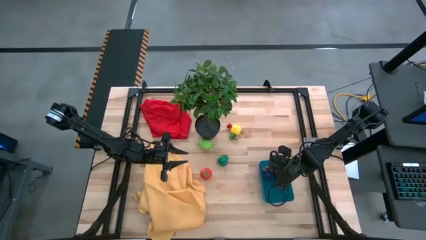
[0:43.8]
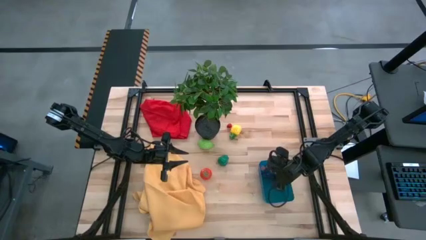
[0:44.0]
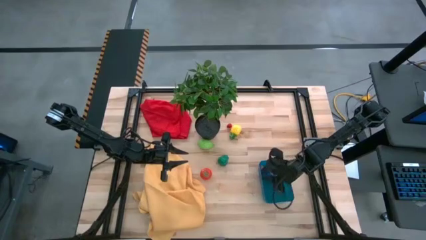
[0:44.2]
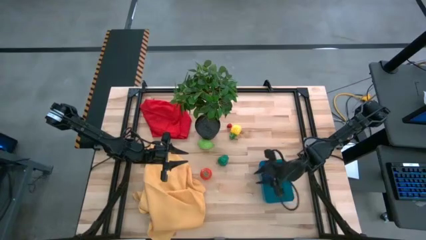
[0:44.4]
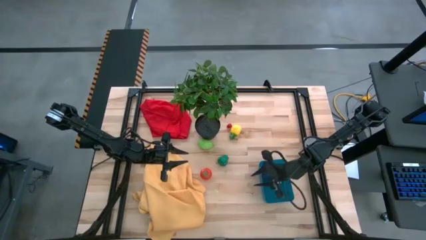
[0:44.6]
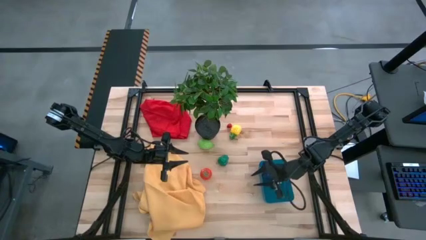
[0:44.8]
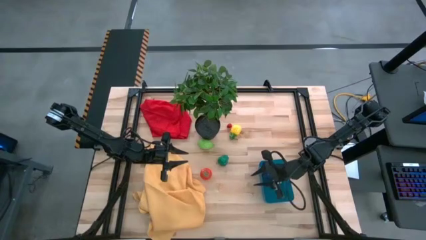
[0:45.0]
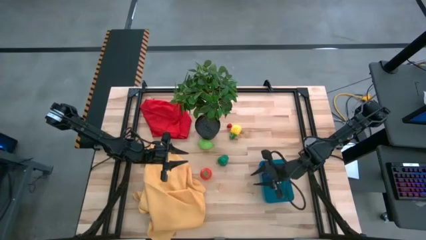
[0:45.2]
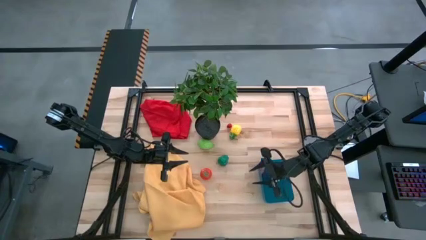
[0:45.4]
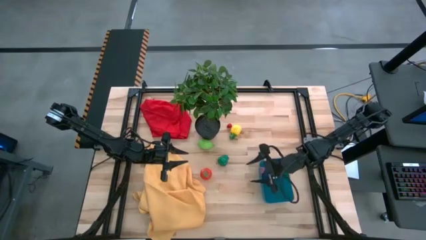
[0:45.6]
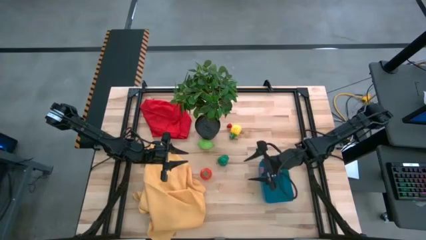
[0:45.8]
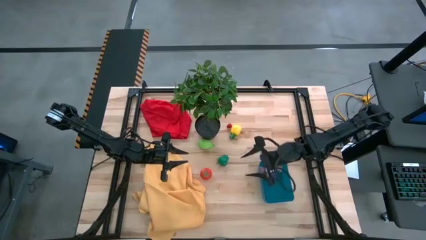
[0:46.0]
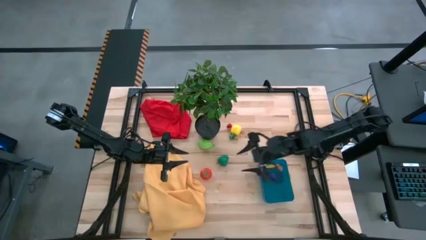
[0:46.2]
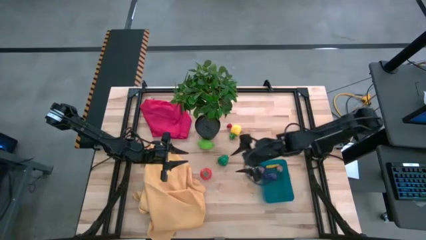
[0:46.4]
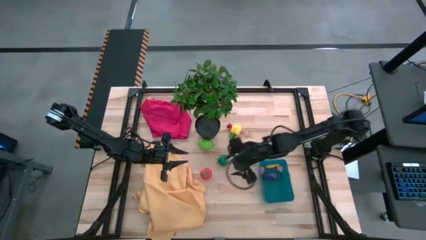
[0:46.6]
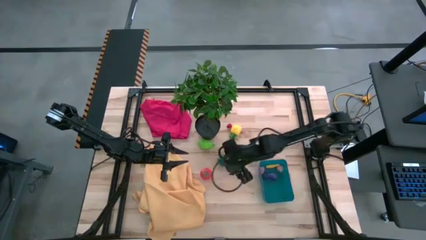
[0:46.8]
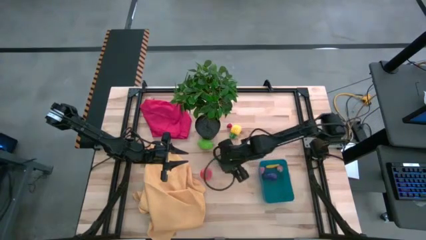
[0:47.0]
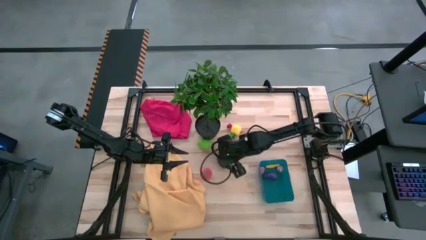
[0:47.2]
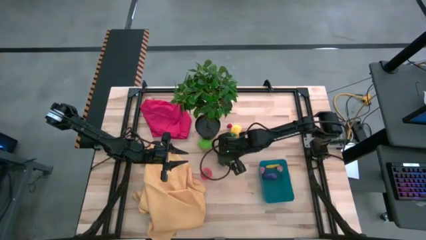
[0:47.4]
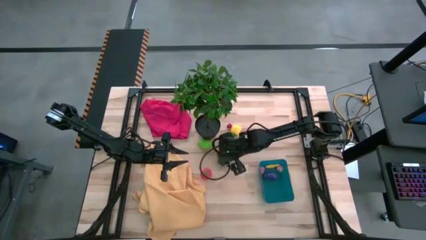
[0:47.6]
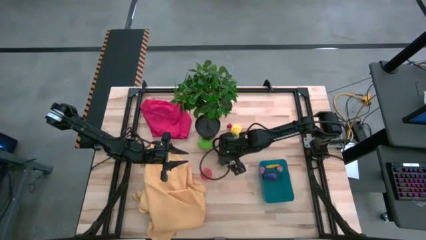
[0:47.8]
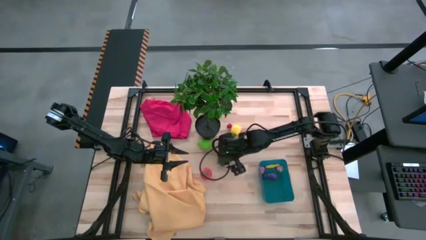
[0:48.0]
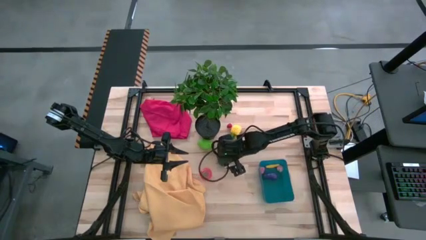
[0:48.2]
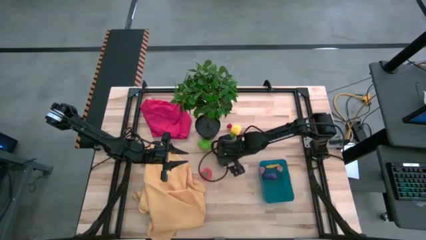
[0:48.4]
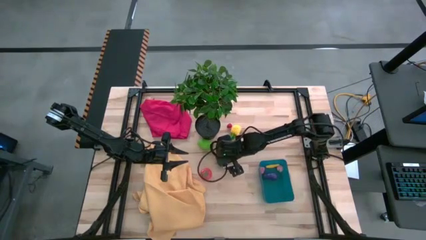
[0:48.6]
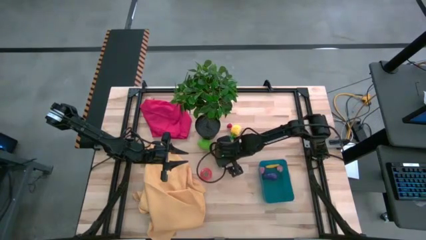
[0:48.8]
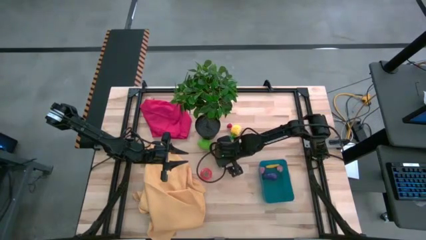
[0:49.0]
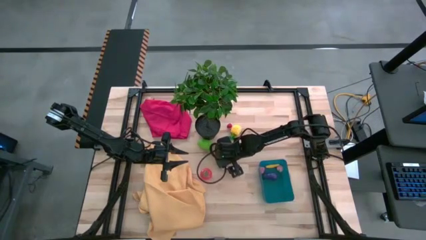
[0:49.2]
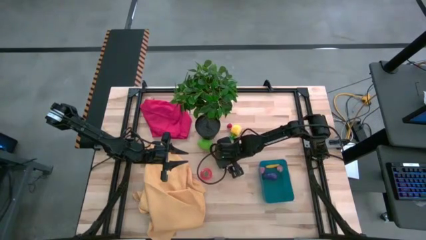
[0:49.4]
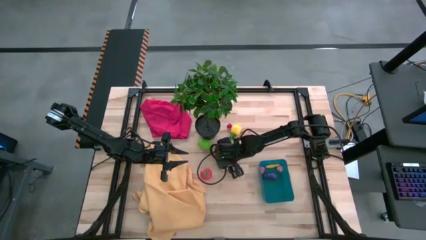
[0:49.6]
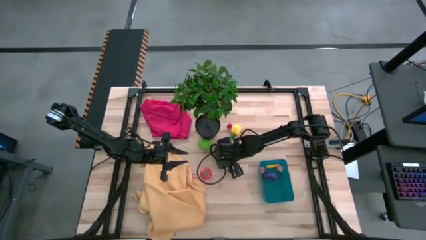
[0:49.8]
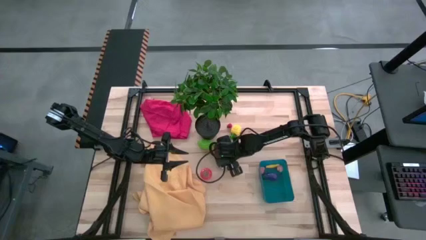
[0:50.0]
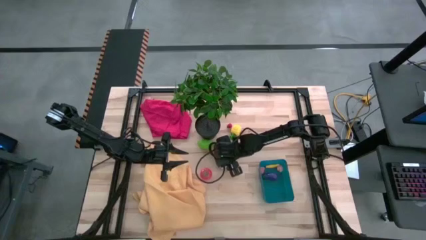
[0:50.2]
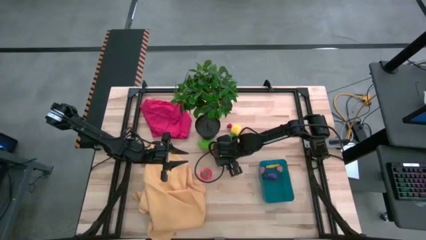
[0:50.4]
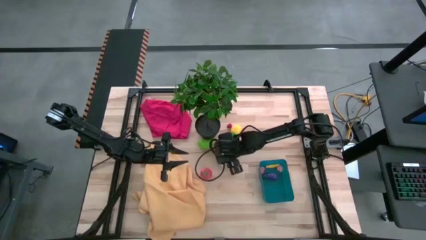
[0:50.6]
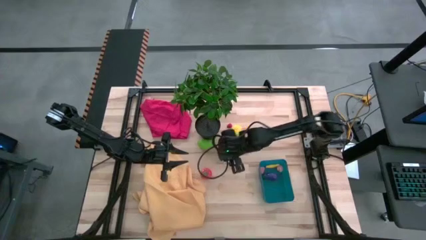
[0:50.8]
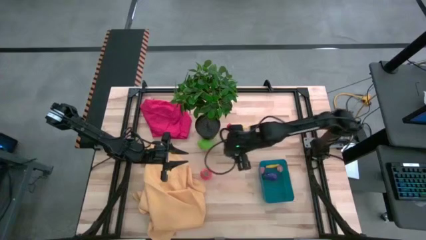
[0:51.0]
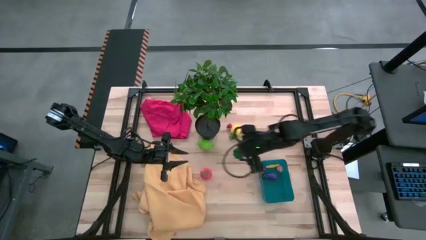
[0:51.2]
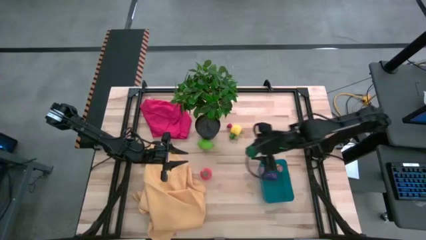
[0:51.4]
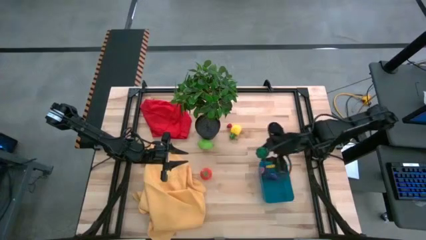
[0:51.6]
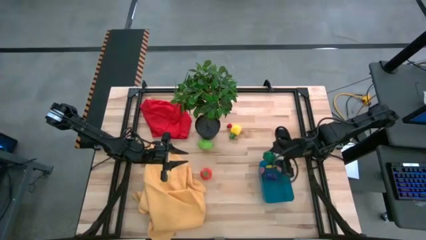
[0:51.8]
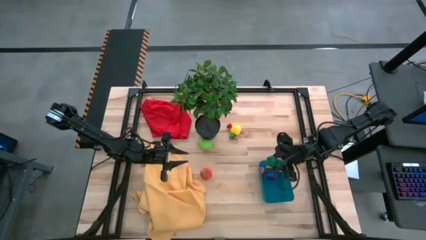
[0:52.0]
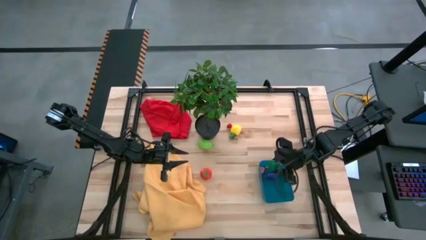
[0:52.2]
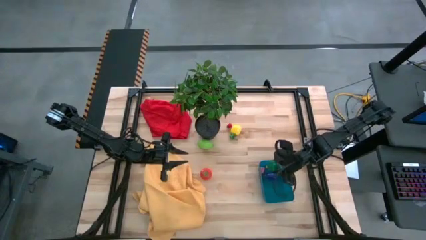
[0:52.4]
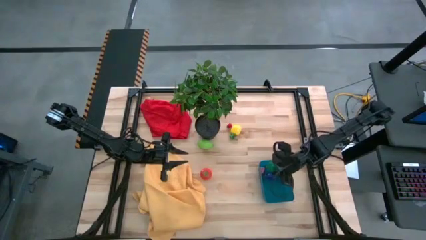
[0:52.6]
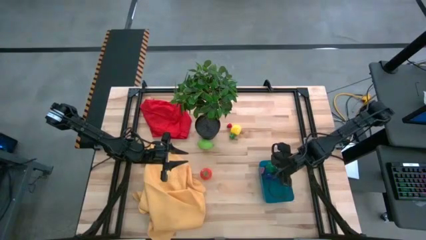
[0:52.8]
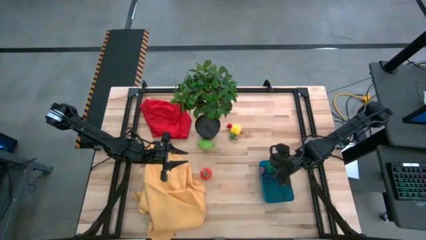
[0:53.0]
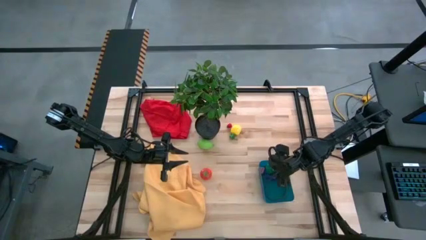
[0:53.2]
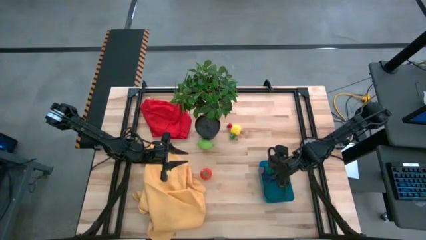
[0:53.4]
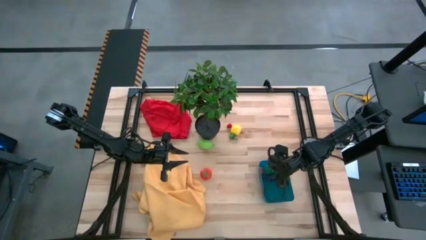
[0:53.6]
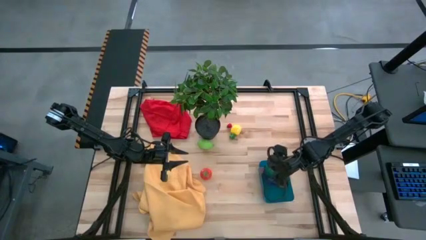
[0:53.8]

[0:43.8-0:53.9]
Task: Pick and placing Produce into tupperware
Put the green bell pepper into the bin
